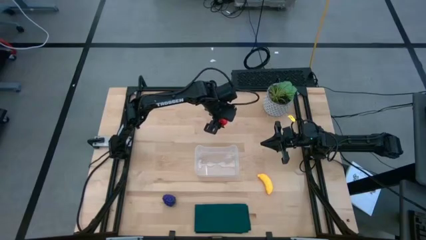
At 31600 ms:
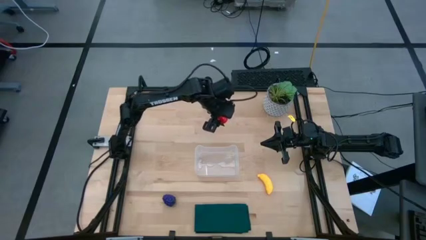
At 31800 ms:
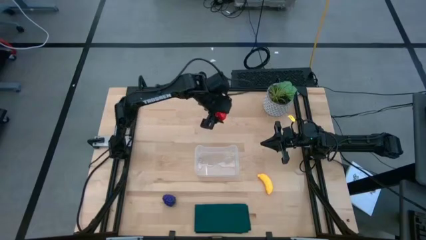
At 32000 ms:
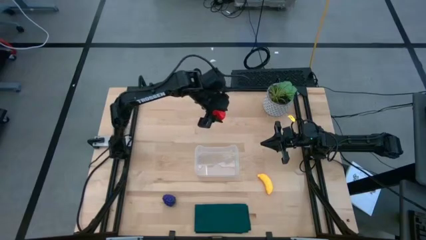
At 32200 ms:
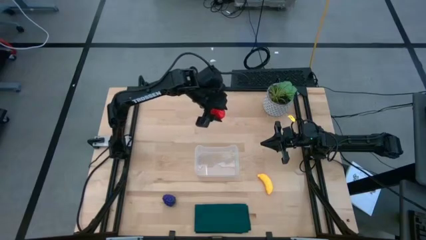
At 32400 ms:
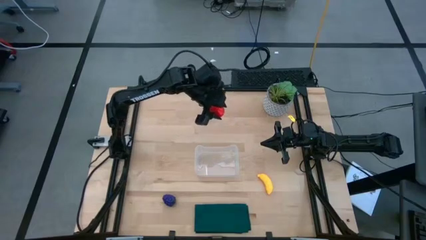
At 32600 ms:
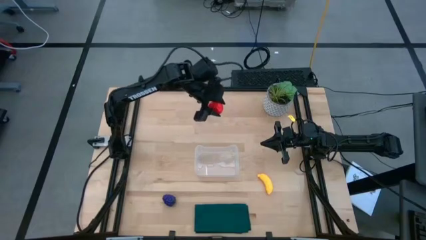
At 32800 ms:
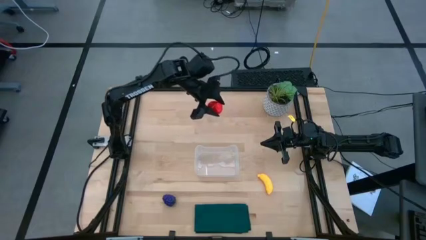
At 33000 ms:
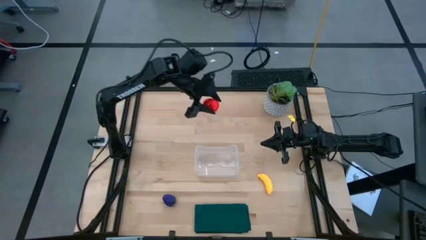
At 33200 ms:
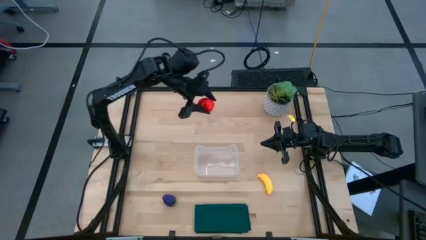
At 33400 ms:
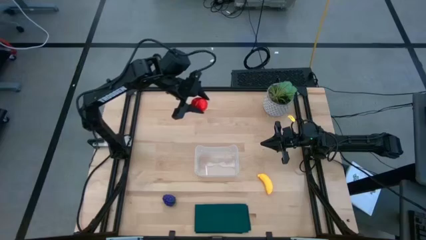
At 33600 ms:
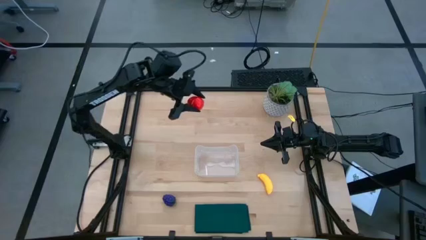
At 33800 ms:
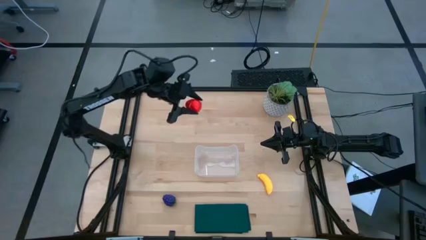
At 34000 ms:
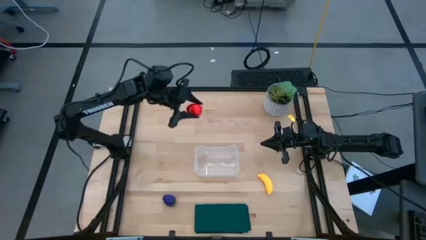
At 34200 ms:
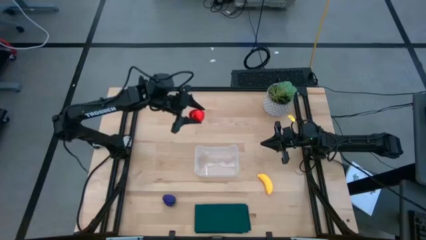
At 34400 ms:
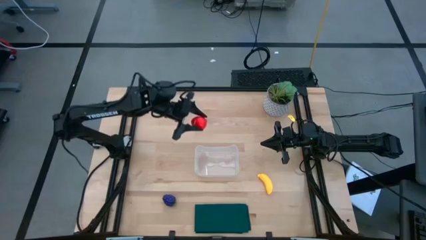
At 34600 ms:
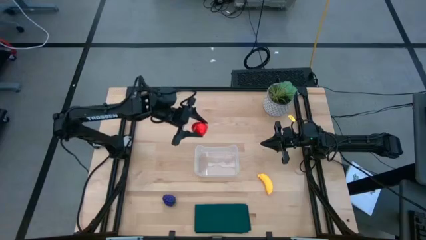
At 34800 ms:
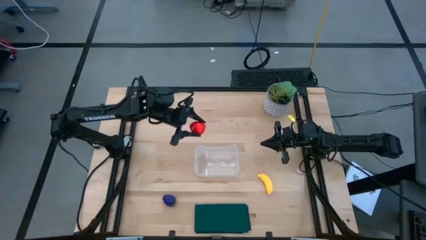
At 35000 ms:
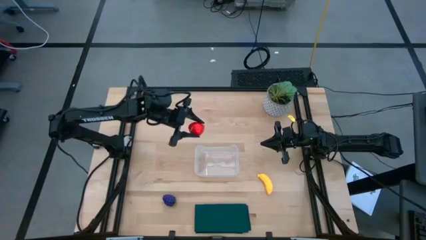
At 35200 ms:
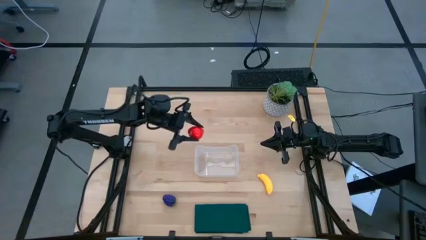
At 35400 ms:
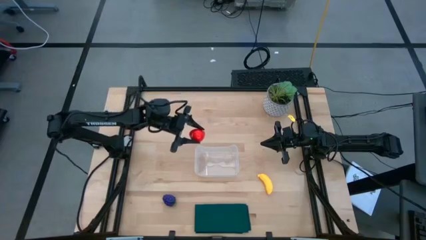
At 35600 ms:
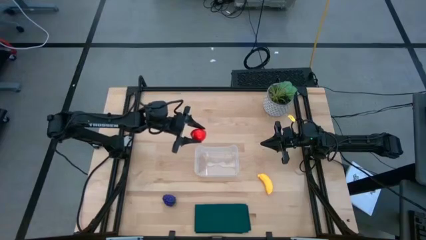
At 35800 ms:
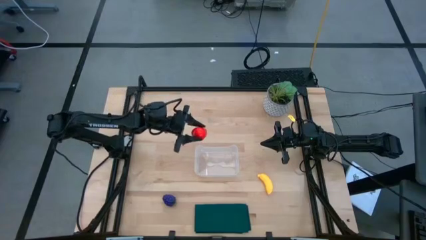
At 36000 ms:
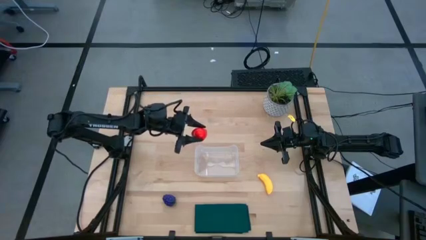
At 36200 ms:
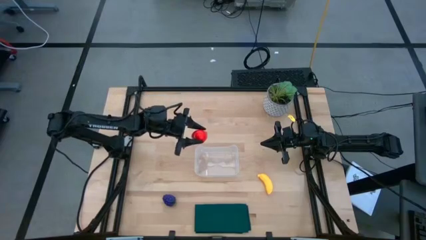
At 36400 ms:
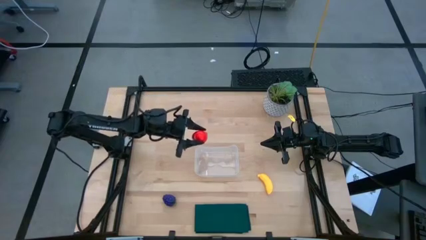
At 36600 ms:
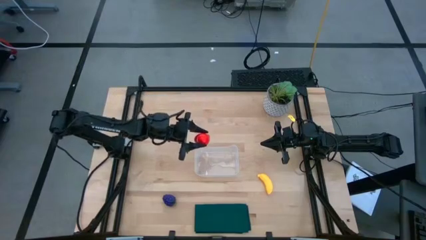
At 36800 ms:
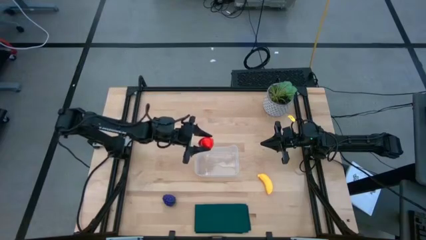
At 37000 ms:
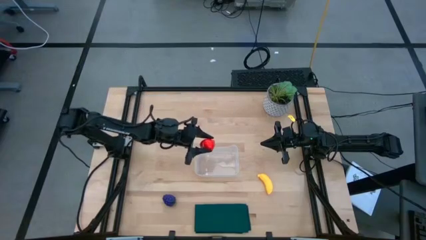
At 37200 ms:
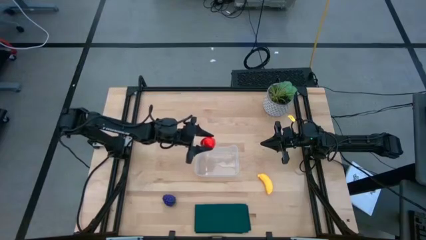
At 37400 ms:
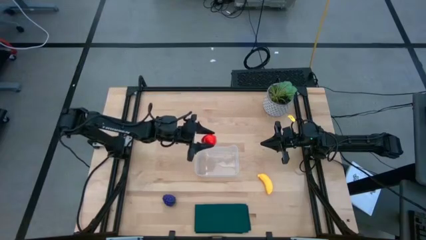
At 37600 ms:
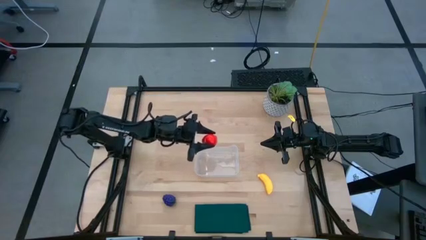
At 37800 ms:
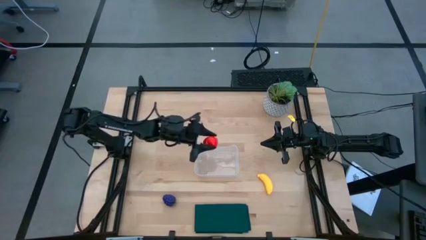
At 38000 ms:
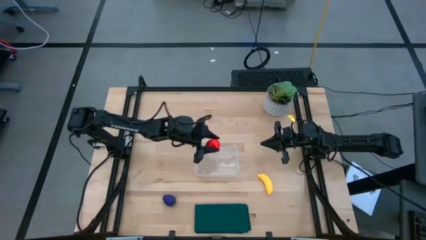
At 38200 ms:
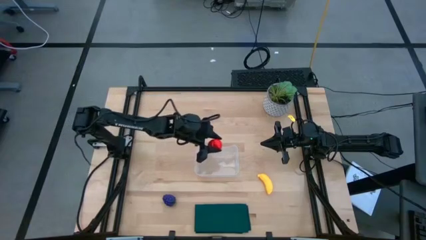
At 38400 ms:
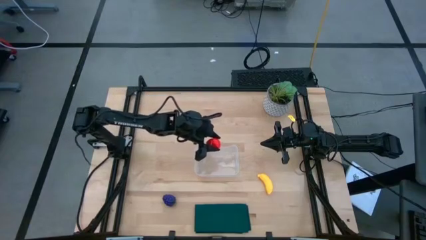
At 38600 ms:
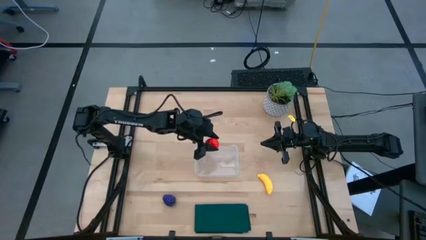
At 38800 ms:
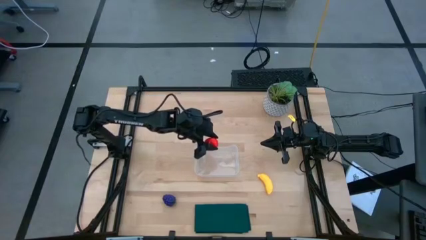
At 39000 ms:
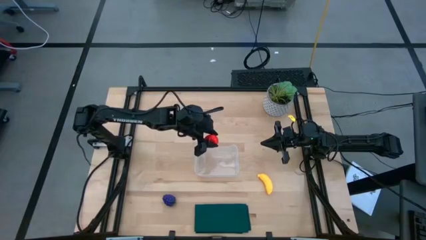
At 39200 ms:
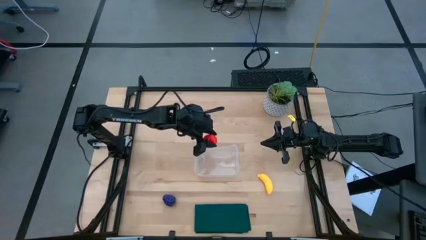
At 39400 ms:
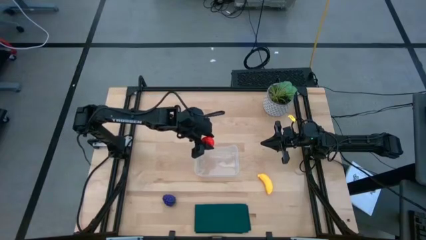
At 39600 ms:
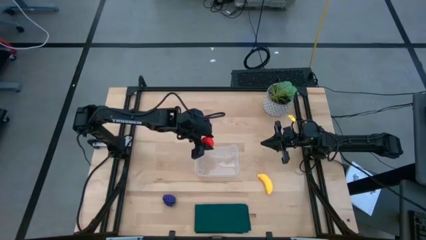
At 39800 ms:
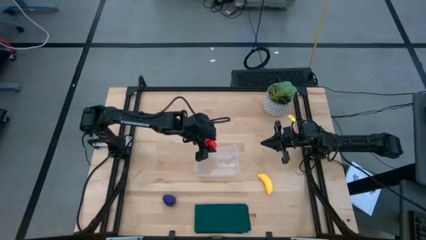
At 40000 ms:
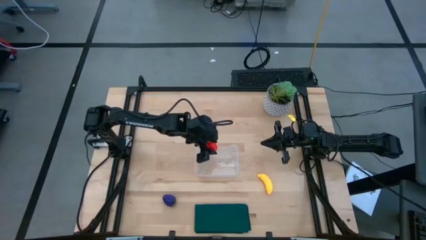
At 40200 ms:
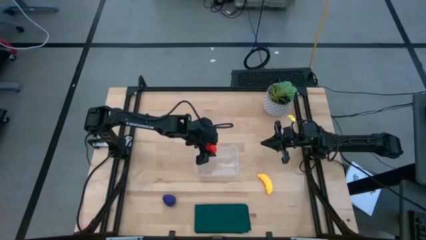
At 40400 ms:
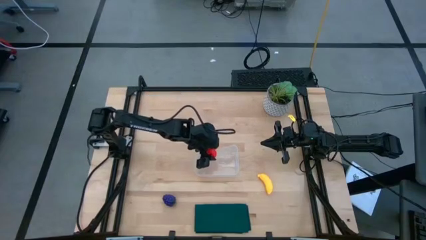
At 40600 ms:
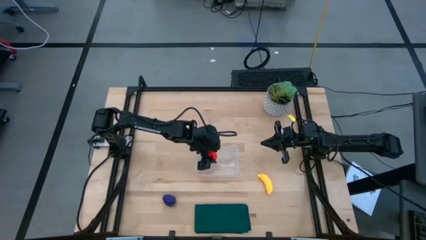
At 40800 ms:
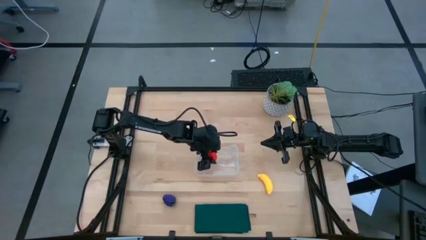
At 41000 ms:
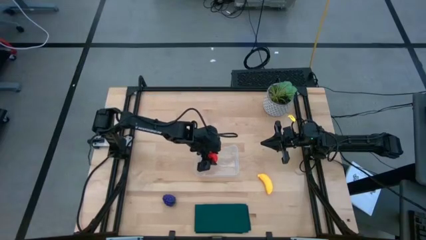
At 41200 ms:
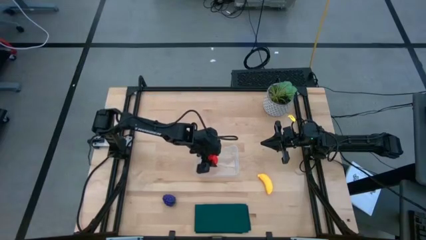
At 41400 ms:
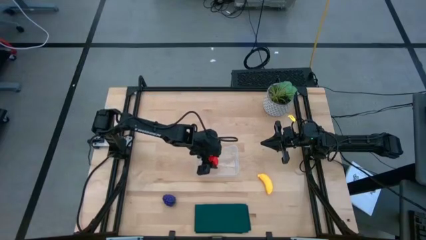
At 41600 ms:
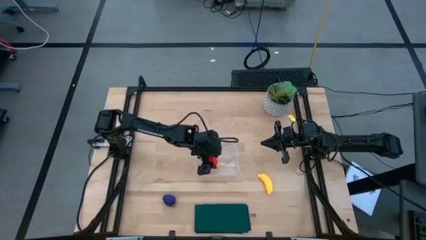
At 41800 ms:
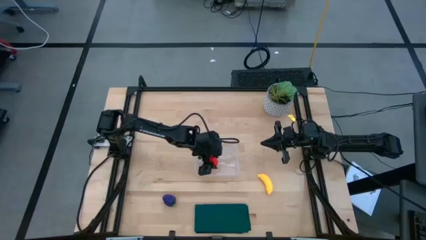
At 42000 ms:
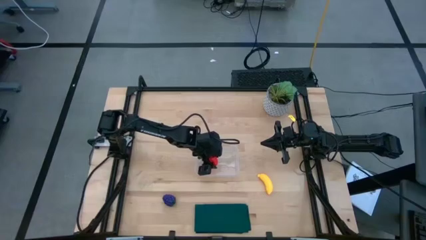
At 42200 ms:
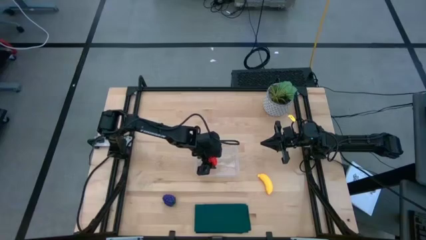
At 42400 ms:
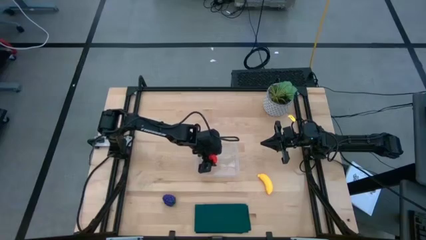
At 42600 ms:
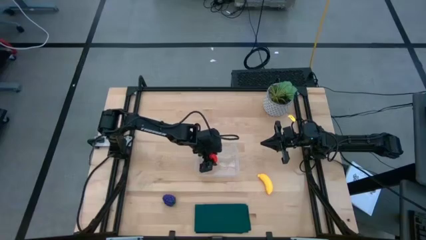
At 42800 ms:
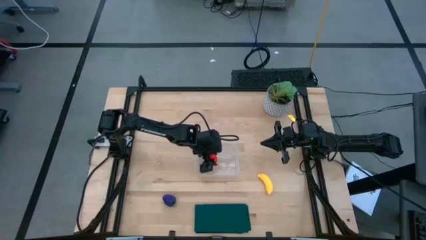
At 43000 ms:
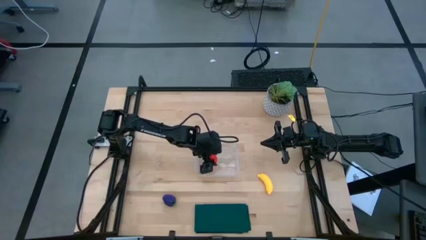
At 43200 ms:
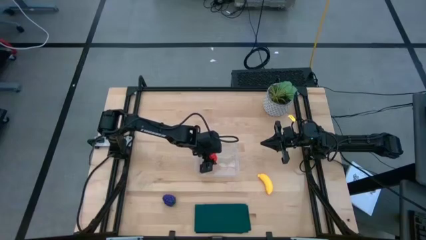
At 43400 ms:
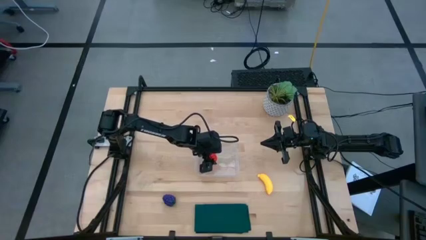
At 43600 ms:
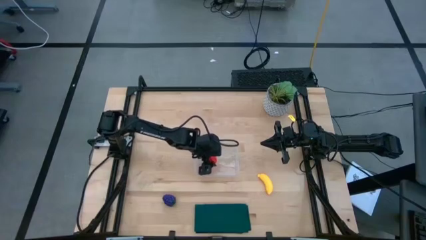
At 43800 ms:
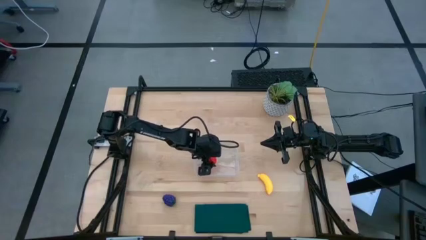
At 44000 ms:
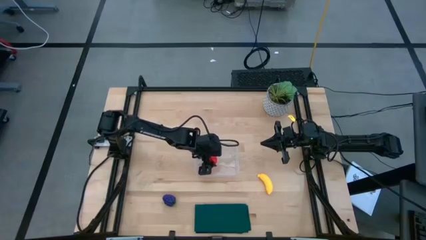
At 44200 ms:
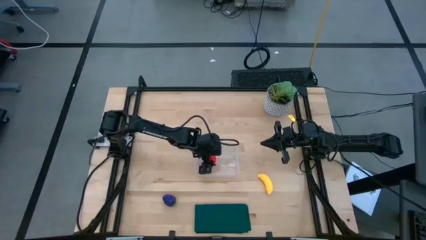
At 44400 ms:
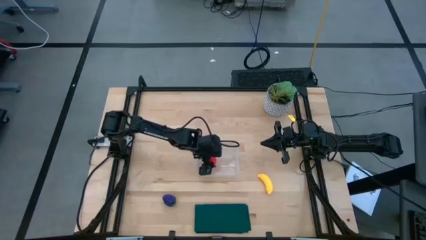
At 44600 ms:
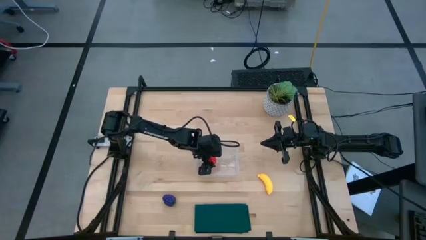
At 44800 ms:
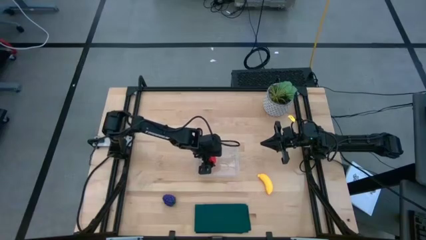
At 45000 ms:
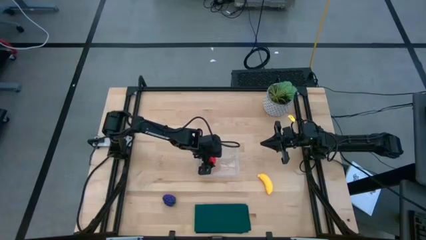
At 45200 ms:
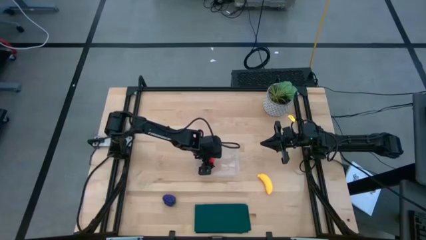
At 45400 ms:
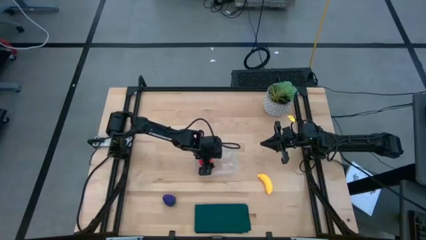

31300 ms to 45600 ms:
Task: Pick and placing Produce into tupperware
Put the red apple into the transparent bin

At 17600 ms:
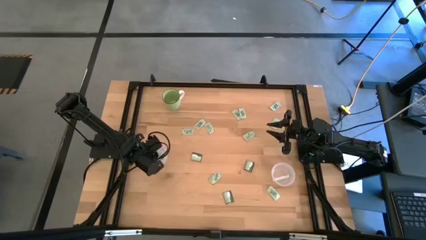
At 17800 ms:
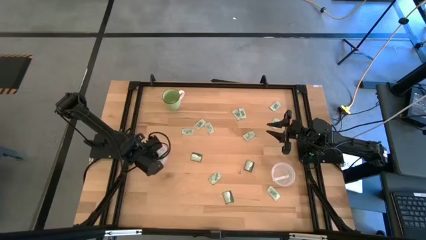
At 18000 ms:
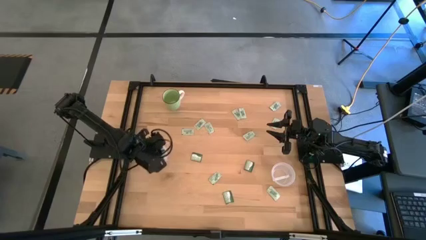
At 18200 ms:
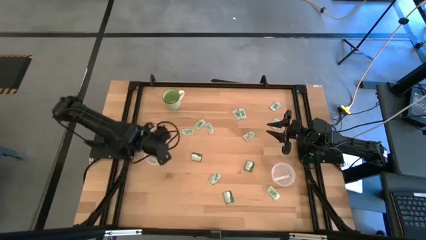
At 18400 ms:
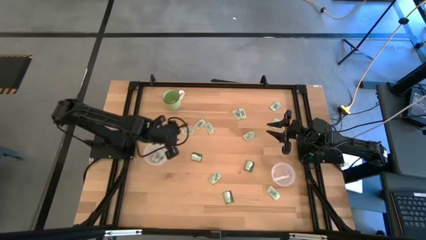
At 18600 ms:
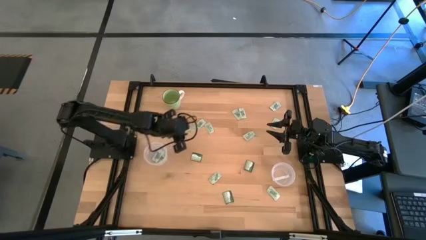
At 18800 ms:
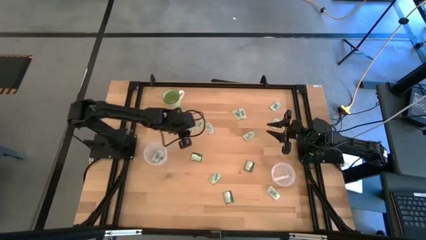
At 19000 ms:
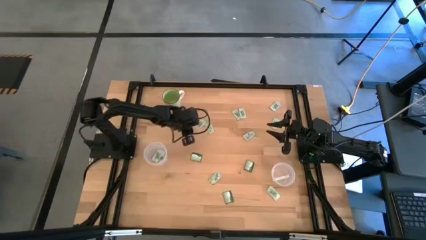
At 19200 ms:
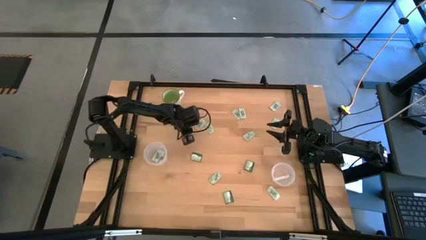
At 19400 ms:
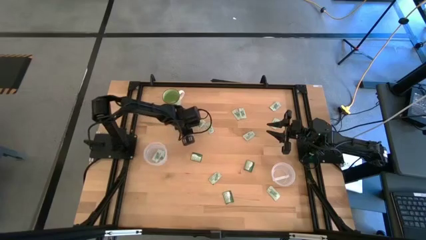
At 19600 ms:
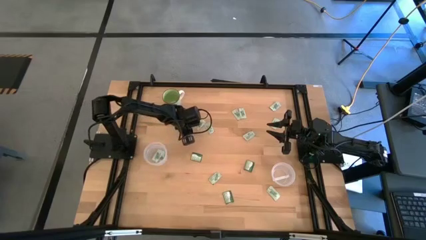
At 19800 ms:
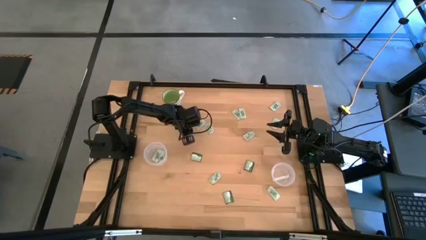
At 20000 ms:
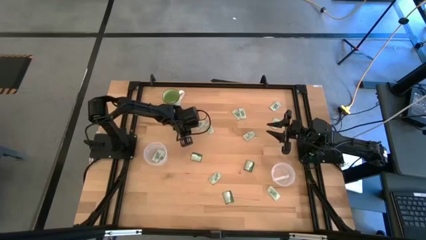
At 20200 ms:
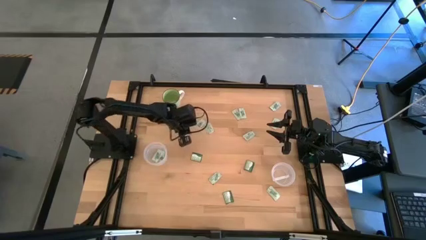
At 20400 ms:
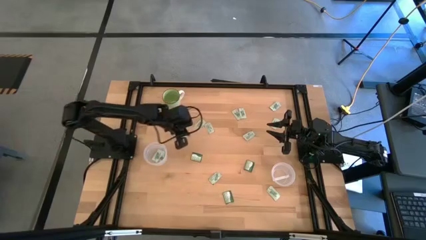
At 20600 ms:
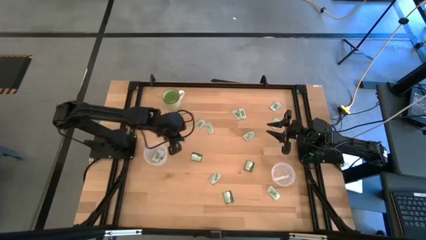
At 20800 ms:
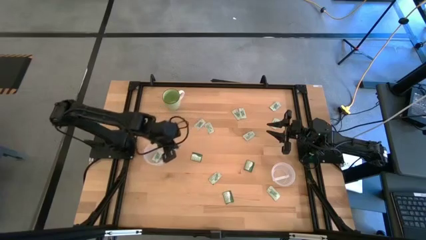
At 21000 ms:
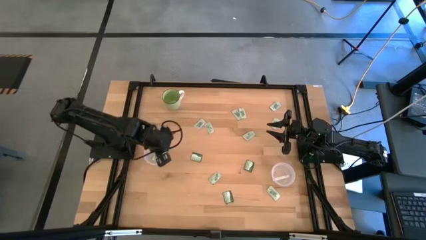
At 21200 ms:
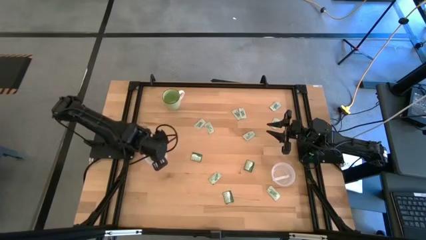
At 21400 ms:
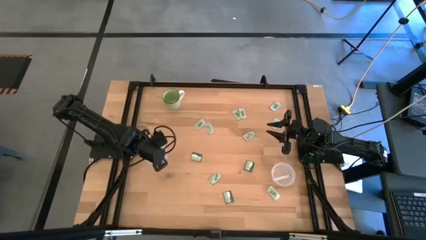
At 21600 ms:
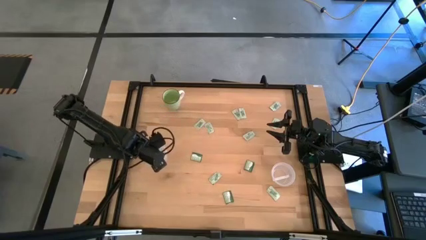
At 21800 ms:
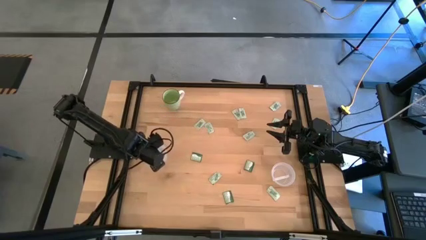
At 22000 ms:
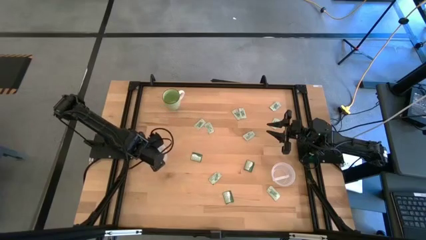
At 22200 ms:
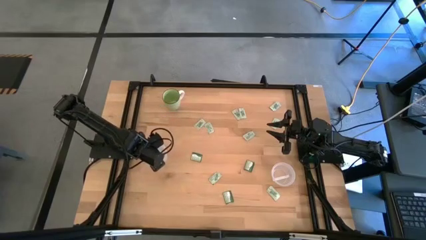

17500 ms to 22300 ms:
Task: Pick and place items into bin
Put the stevia packet into the left transparent bin
